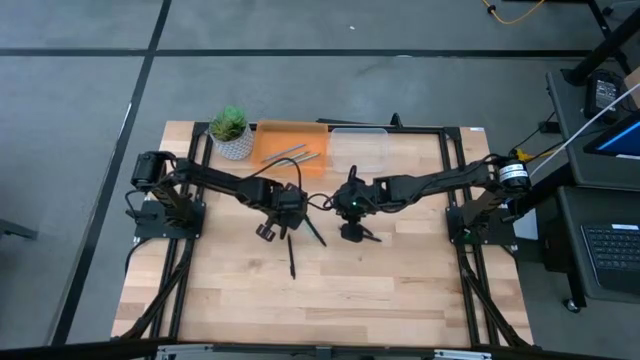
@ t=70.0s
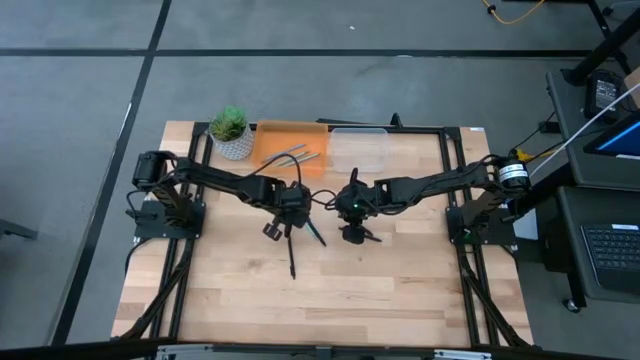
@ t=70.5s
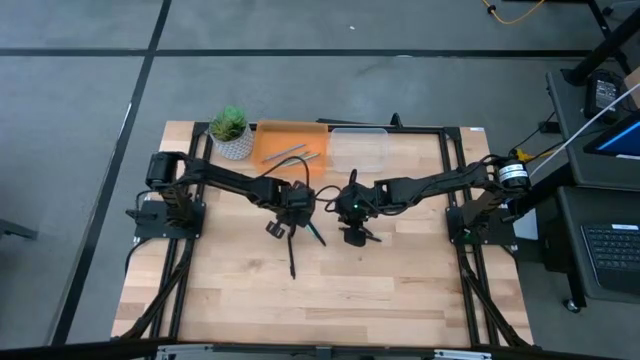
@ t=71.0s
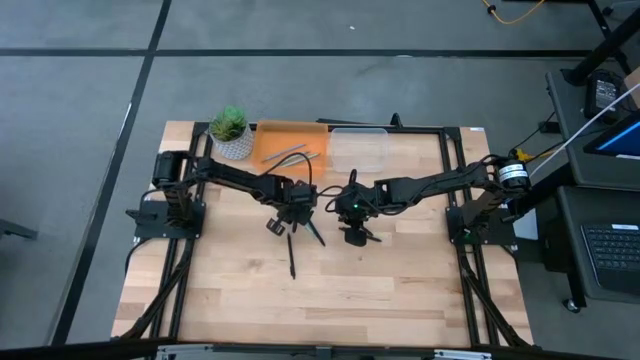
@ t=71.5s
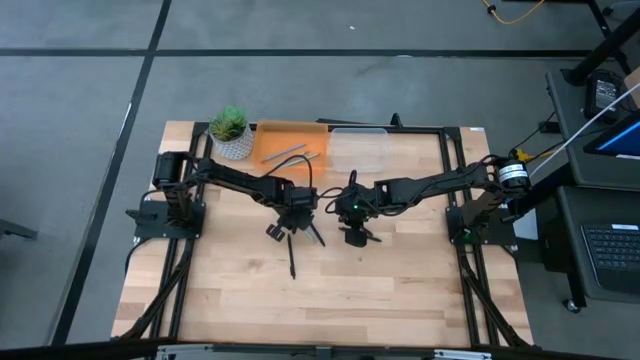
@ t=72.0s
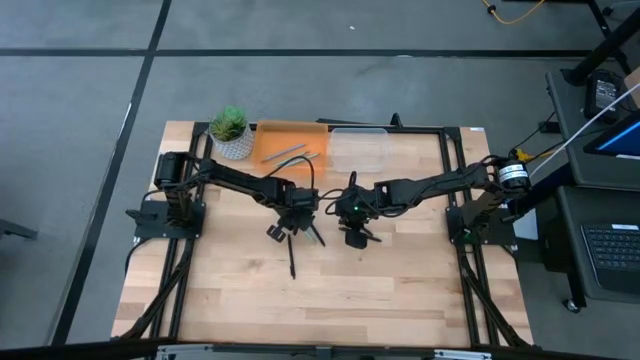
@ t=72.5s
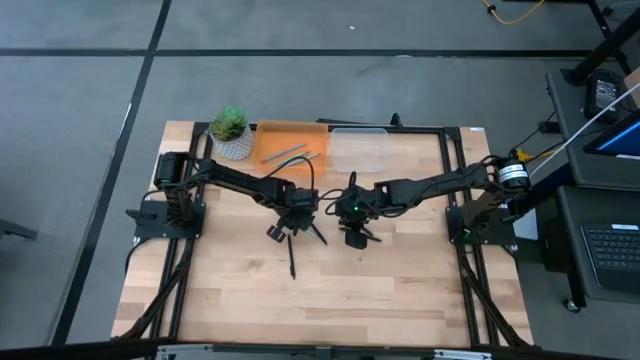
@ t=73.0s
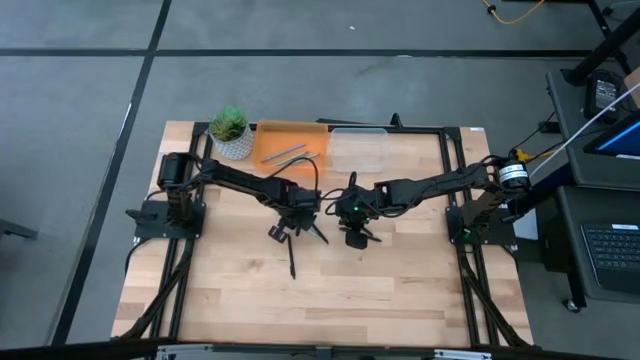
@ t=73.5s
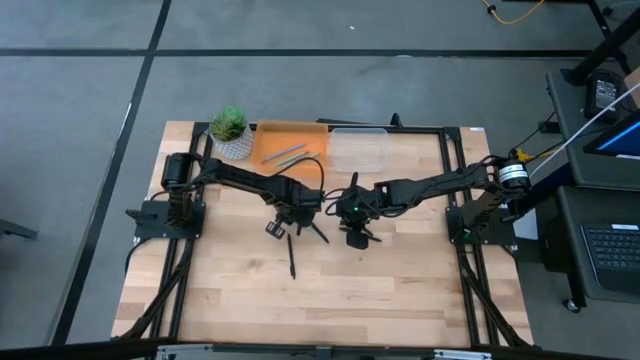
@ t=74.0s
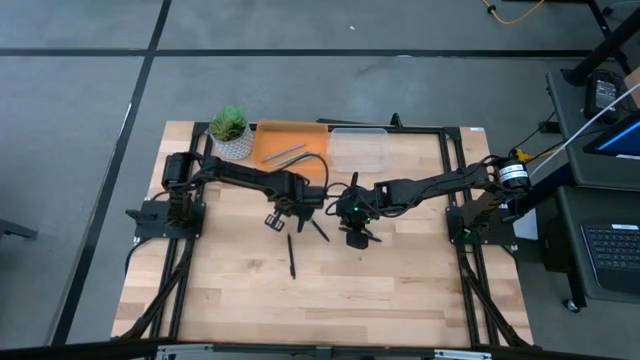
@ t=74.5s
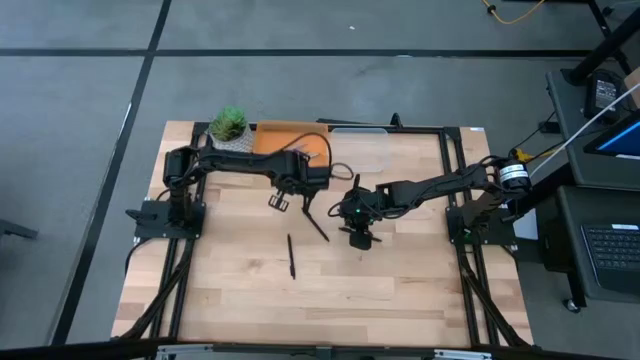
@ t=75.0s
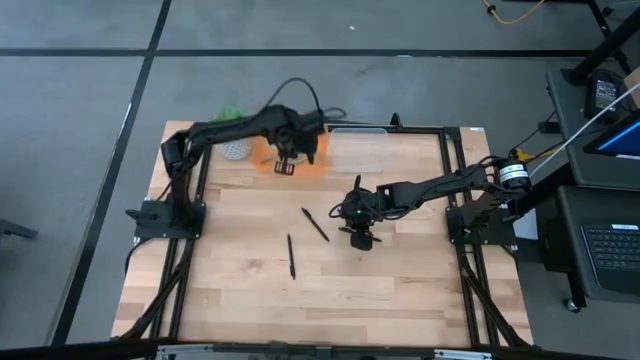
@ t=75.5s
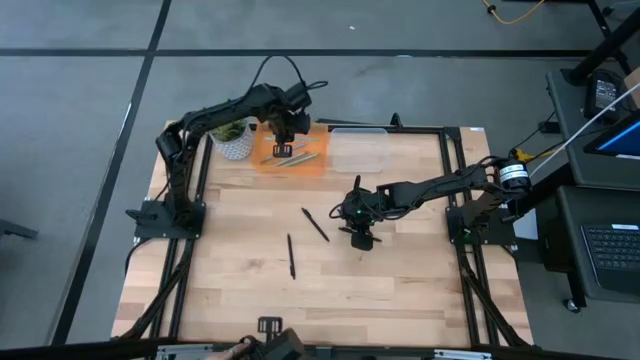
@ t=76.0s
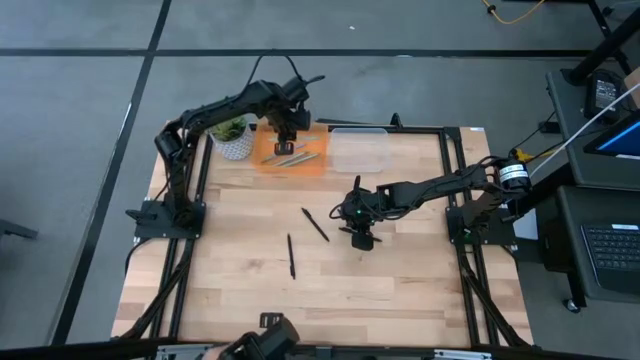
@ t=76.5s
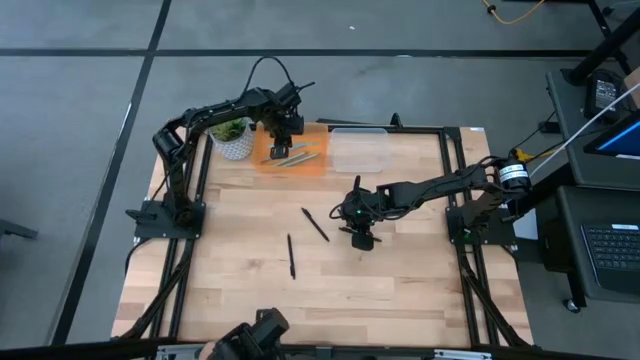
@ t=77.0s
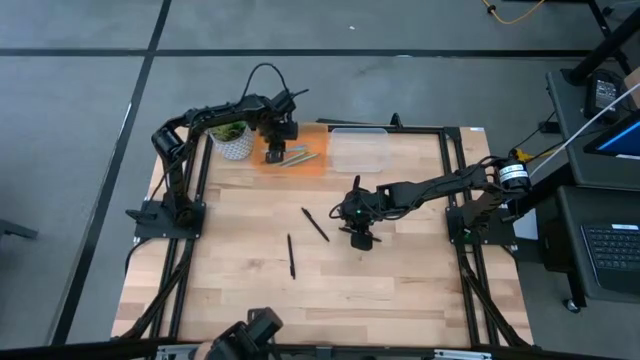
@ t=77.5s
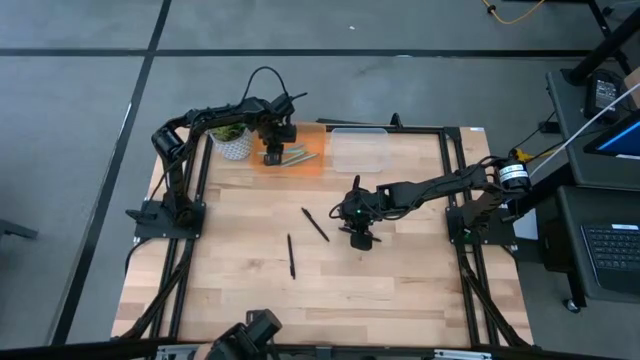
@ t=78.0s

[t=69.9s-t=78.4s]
Task: Sort pens & pencils
Put the light blue pencil into the orange bin

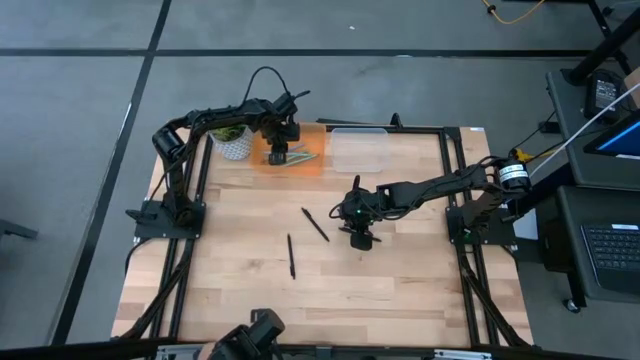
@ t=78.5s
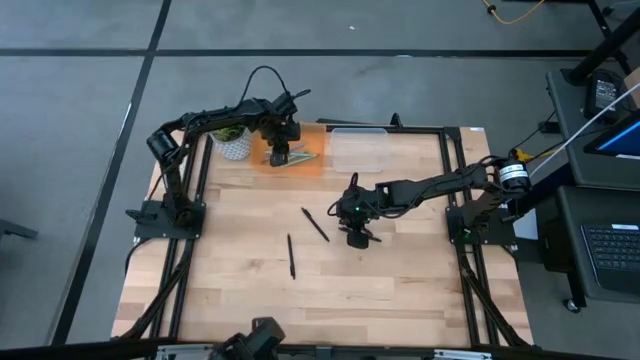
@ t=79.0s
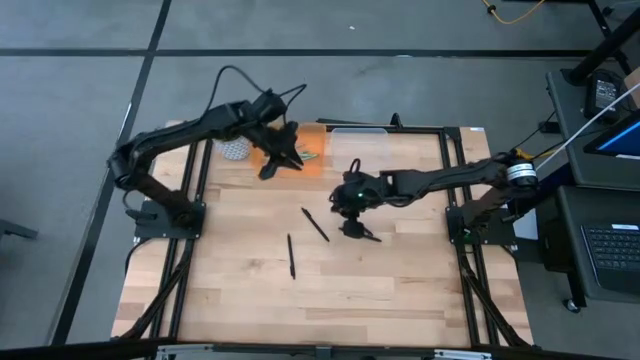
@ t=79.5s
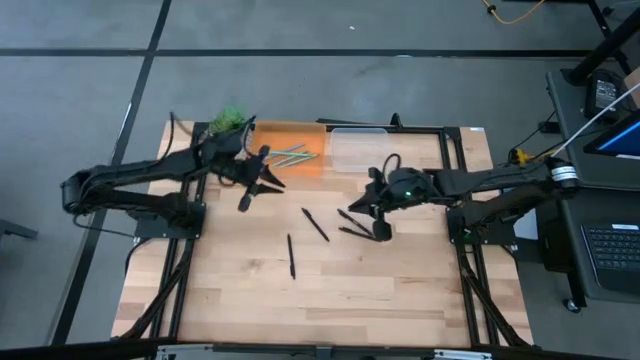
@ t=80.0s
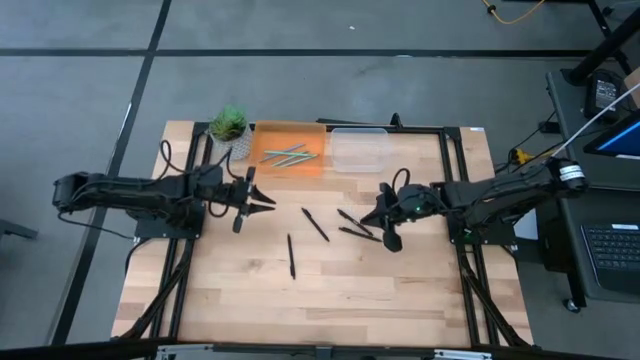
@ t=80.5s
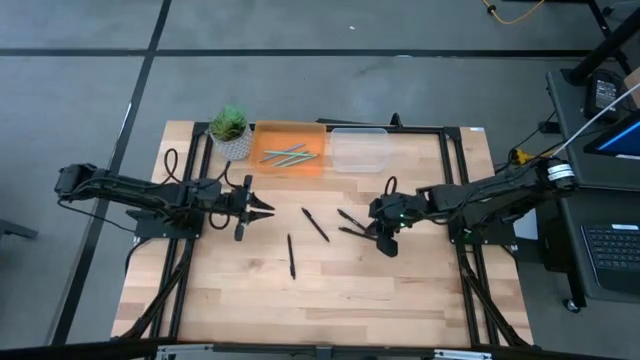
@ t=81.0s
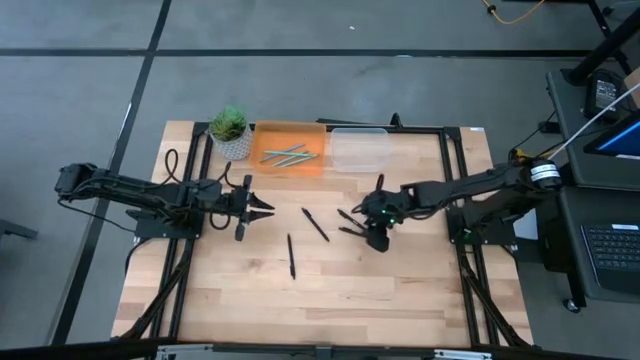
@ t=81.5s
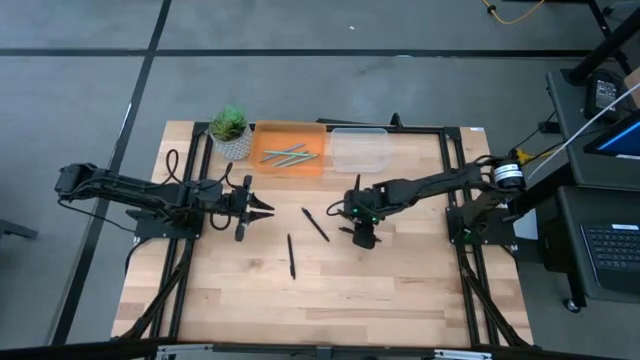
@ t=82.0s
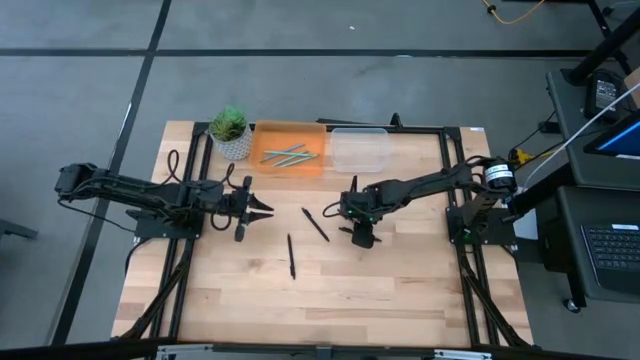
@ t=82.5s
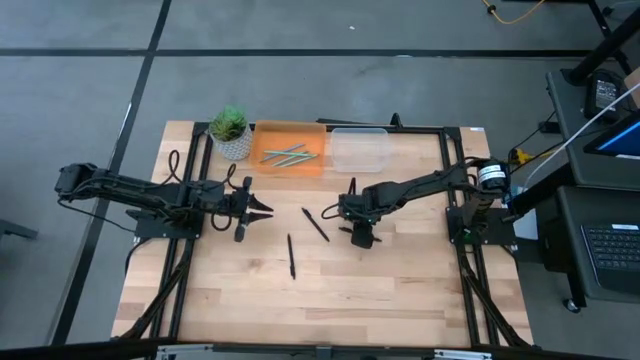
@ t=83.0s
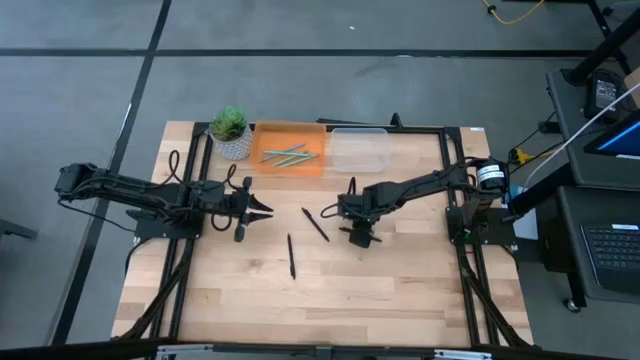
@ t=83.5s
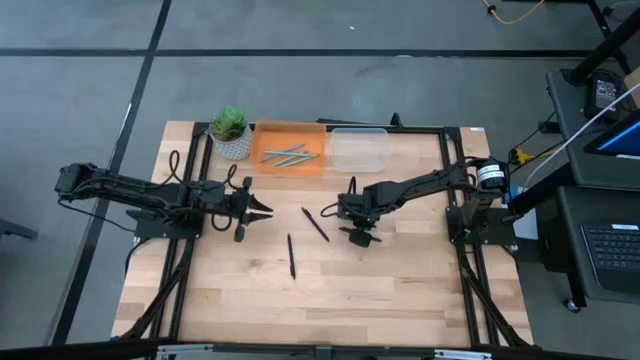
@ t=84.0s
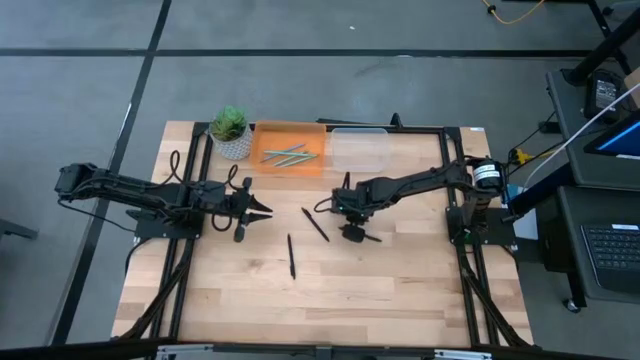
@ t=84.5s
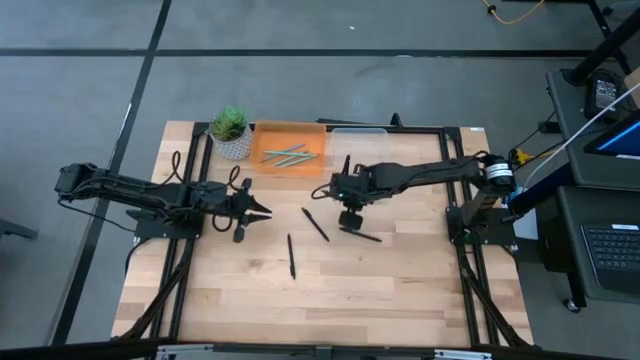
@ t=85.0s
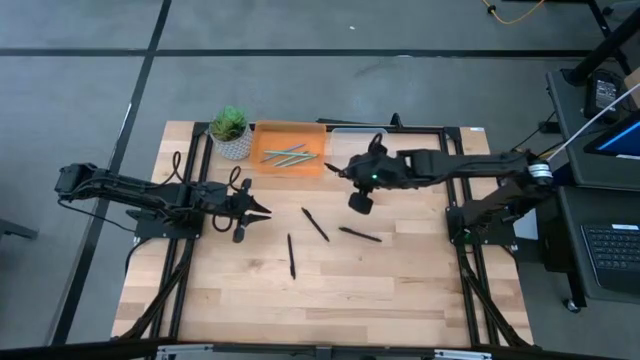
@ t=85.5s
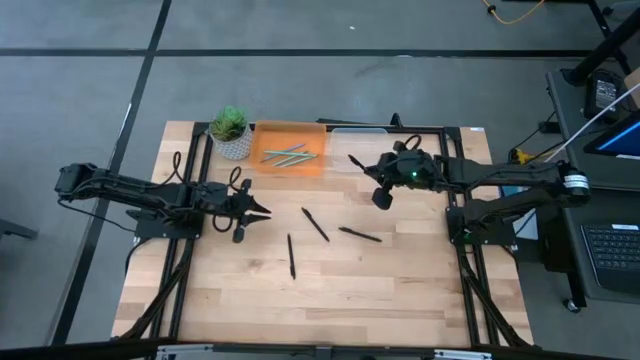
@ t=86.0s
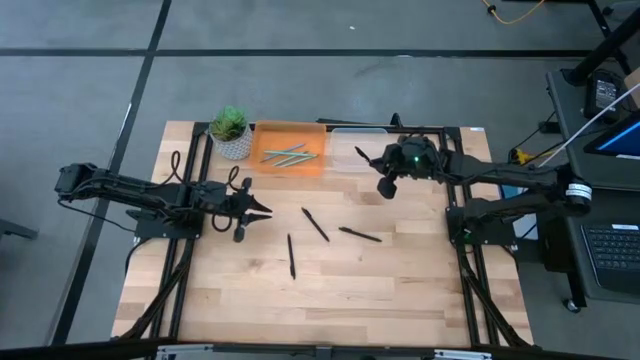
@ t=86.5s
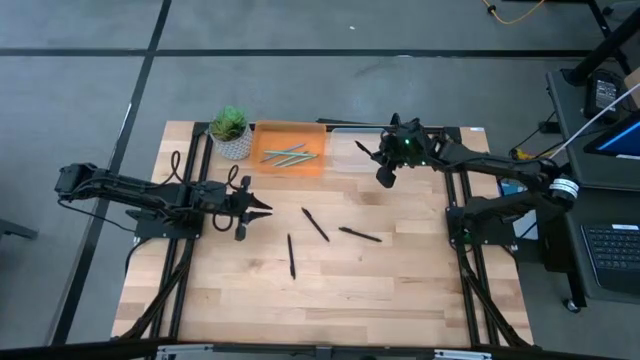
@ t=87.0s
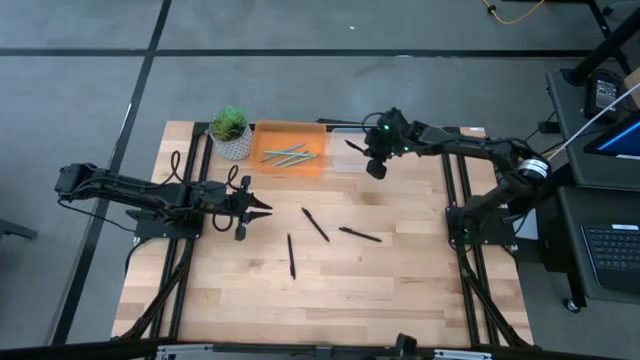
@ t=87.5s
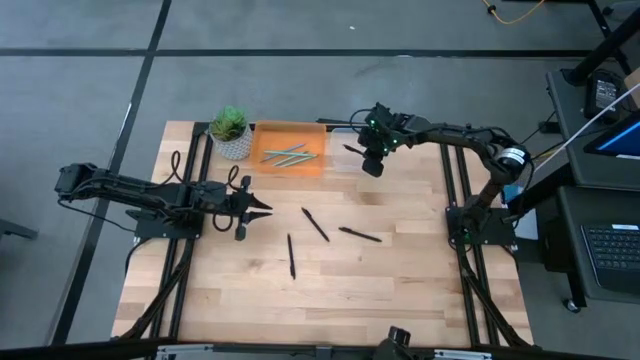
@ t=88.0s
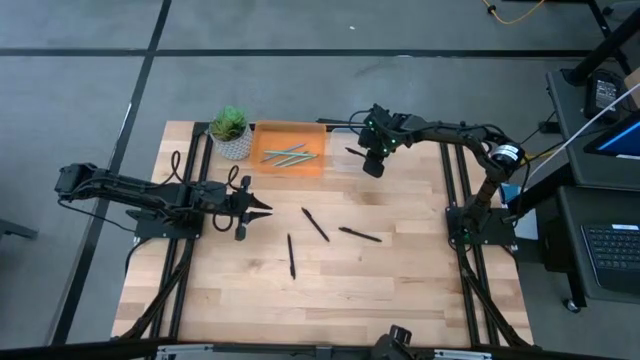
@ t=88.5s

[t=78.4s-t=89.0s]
Put the black pen into the transparent bin

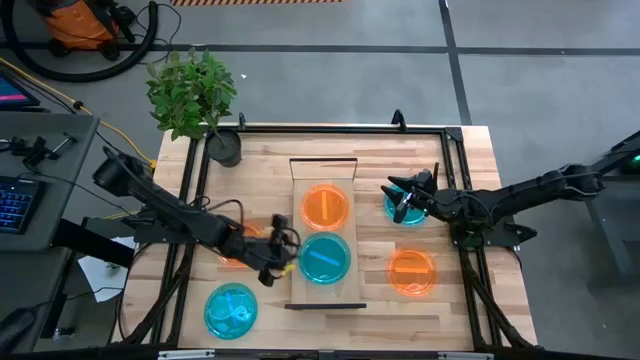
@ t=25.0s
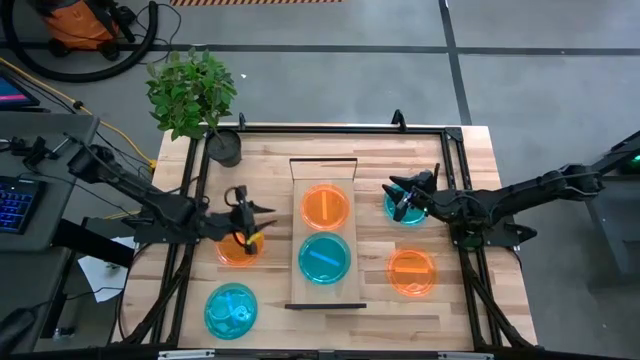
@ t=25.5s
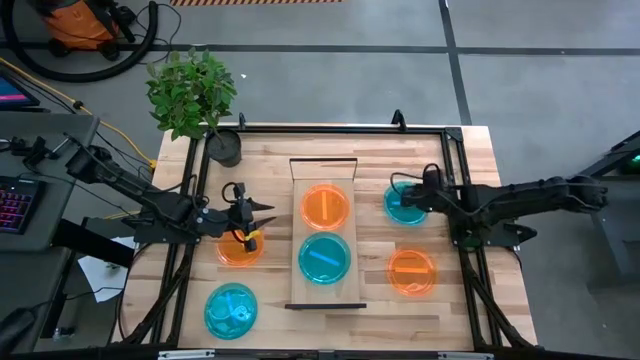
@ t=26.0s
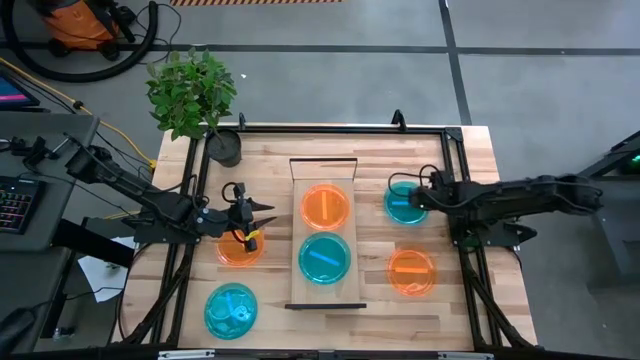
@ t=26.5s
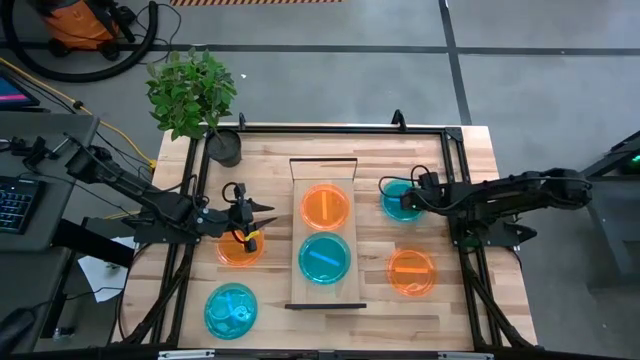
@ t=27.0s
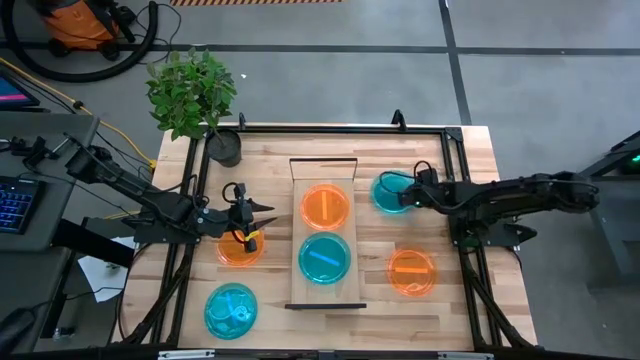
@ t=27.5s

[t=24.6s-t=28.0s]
Task: Place and stack plates onto a shelf
Stack the right blue plate on top of the other blue plate on the shelf
